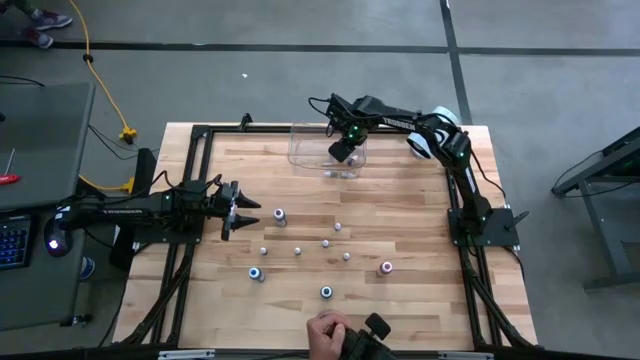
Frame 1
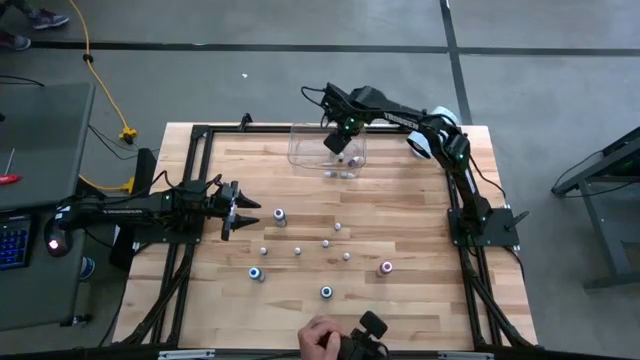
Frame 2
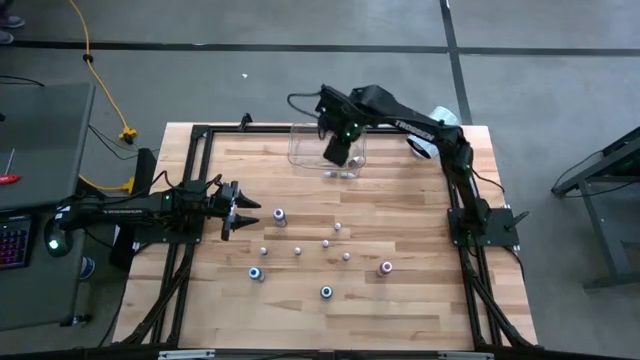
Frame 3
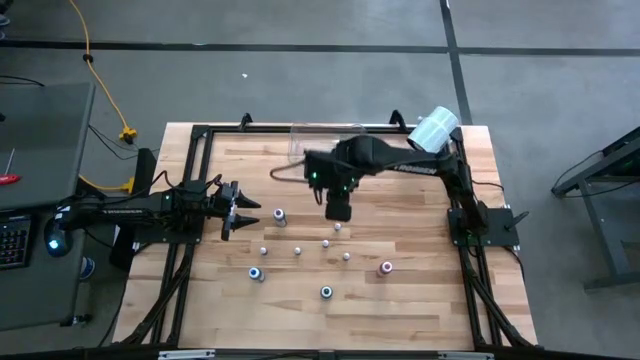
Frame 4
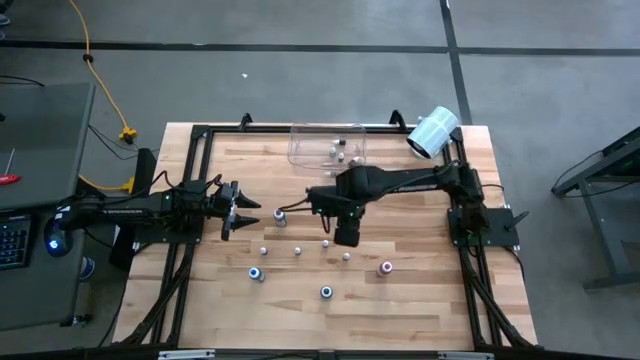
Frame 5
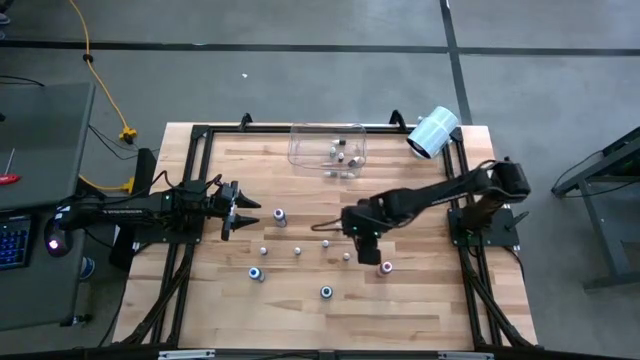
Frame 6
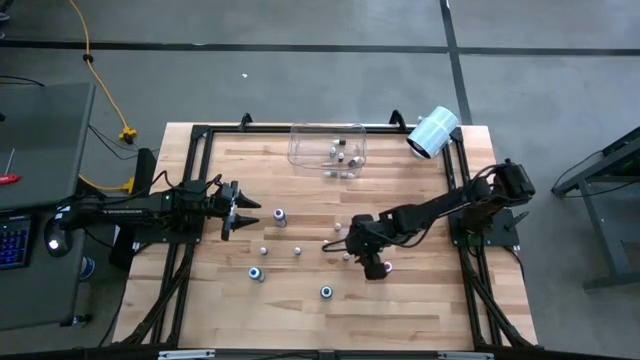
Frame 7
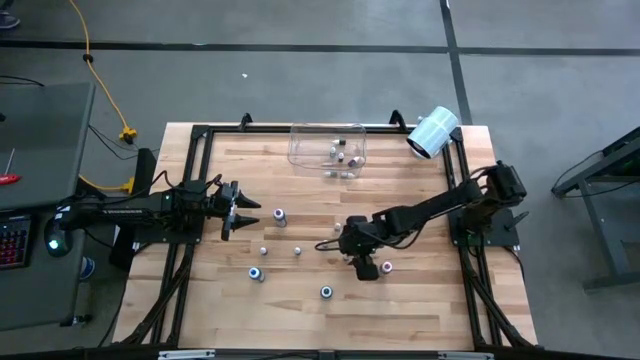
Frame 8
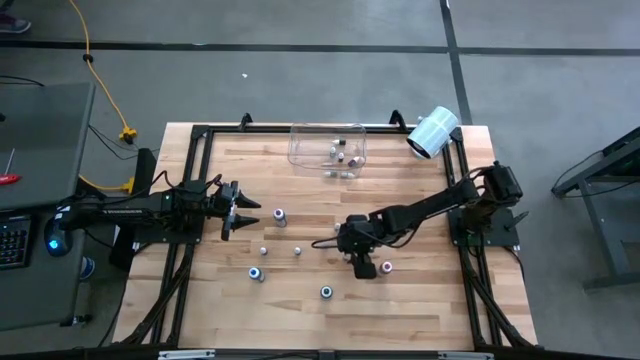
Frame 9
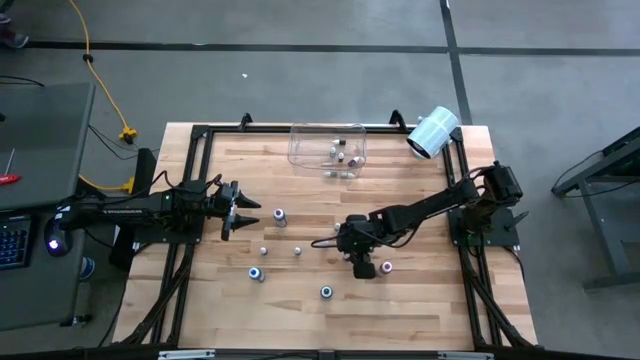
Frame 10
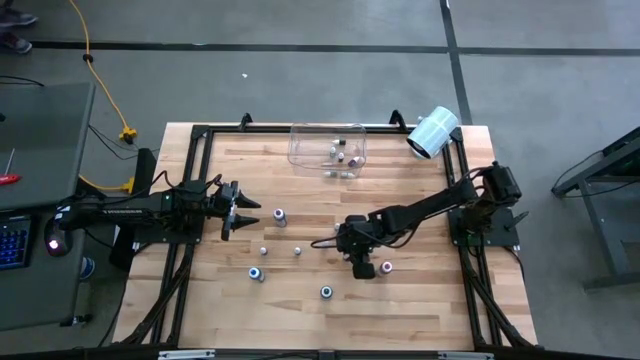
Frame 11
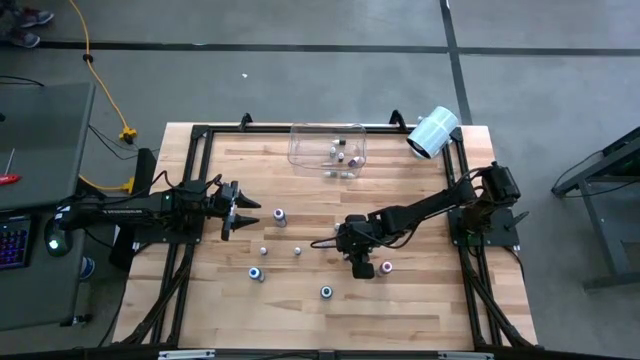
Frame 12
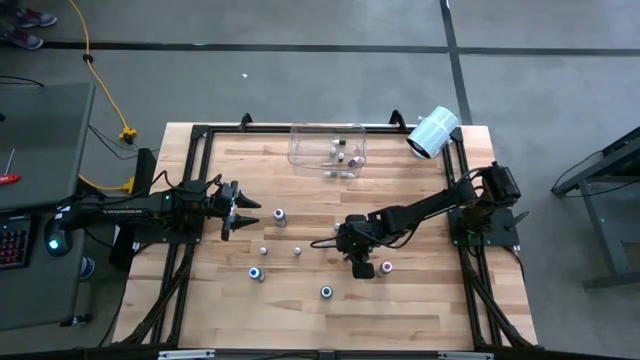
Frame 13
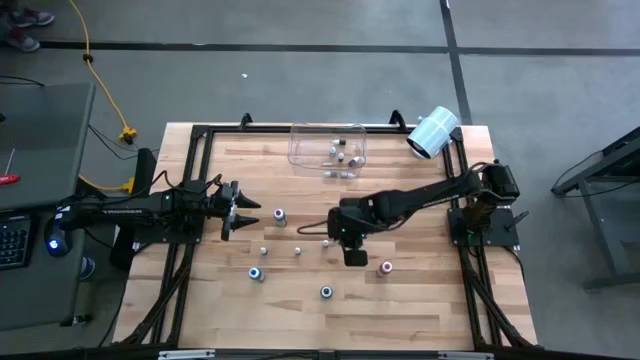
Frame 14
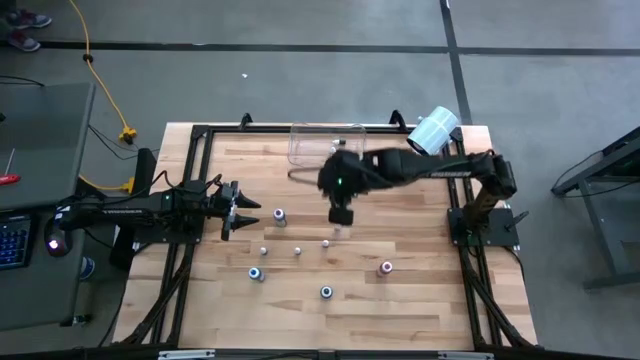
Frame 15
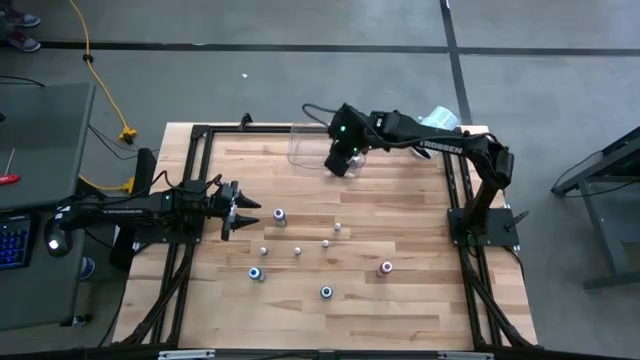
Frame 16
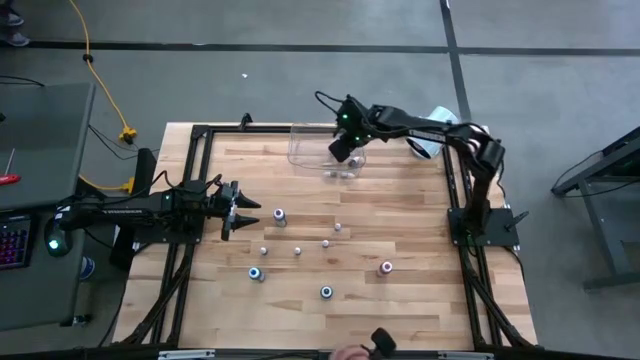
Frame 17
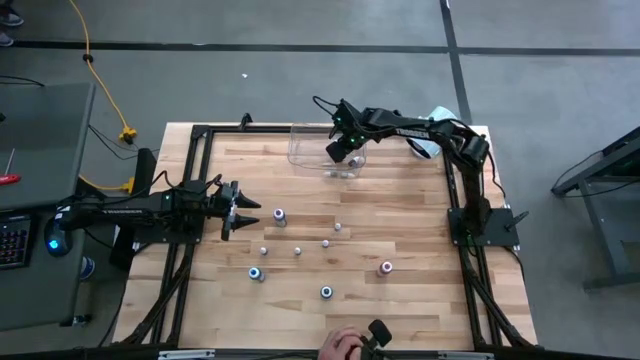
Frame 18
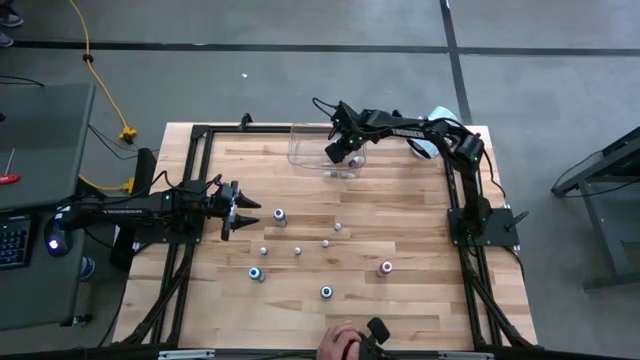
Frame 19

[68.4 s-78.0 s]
Task: Pick & Place food coloring
Put the small blue food coloring into the transparent container

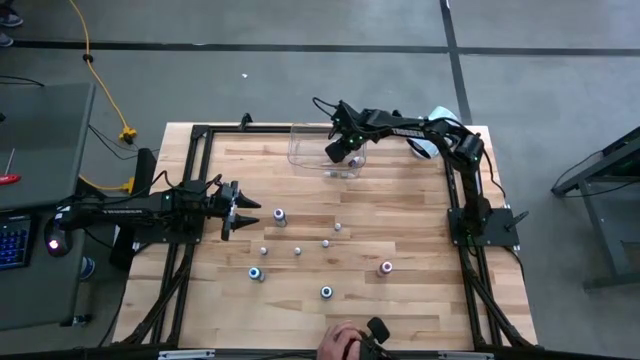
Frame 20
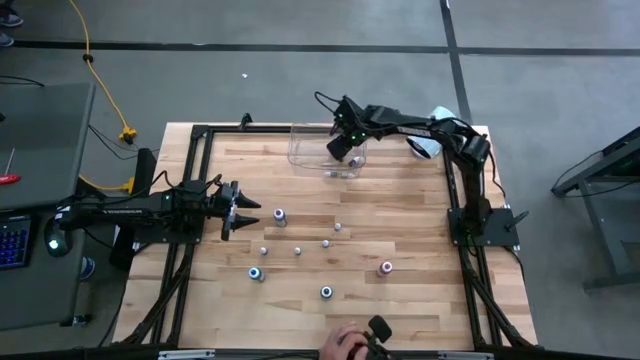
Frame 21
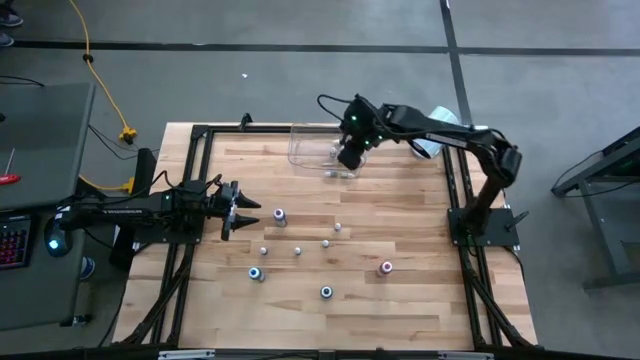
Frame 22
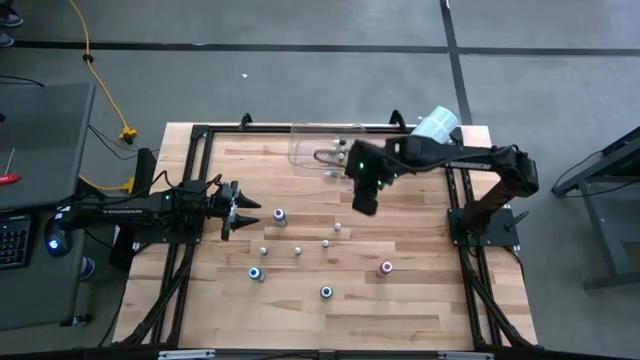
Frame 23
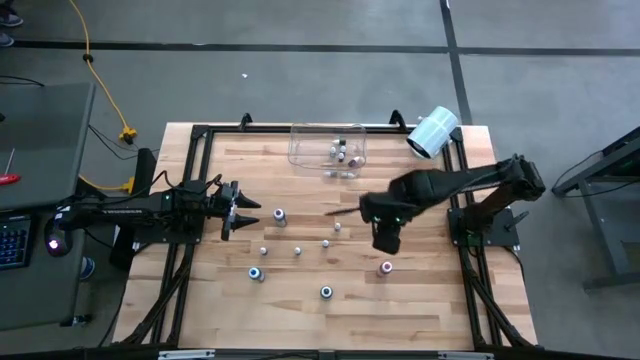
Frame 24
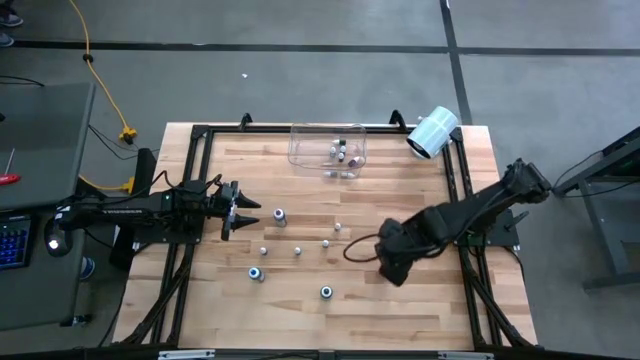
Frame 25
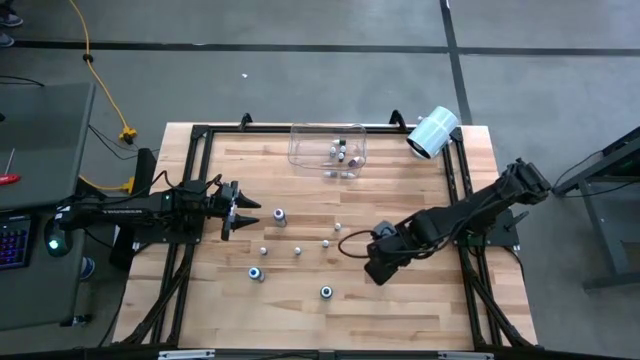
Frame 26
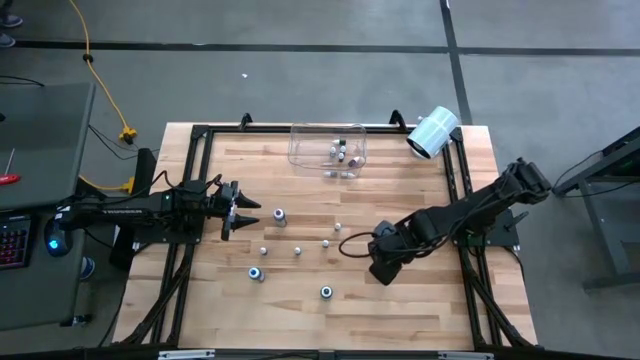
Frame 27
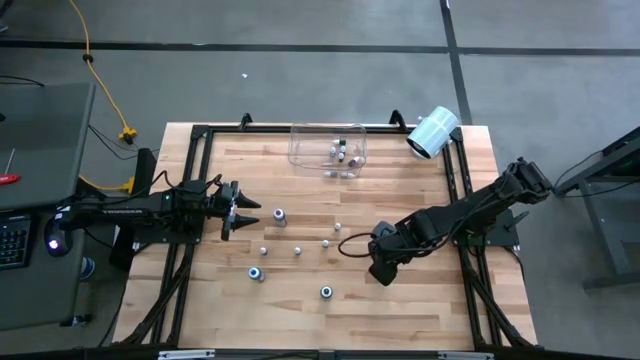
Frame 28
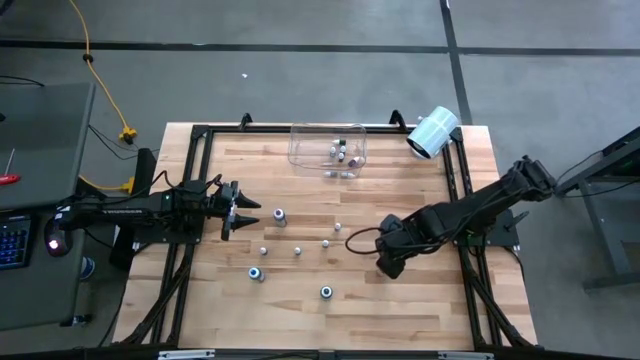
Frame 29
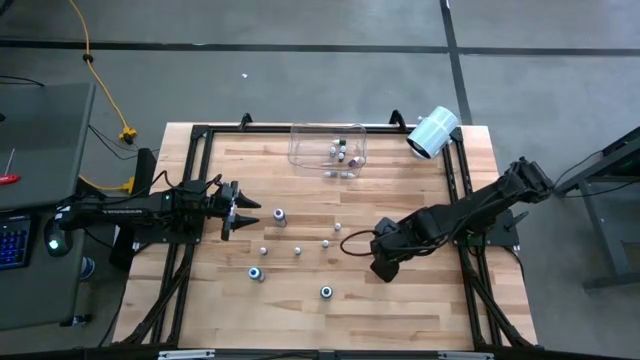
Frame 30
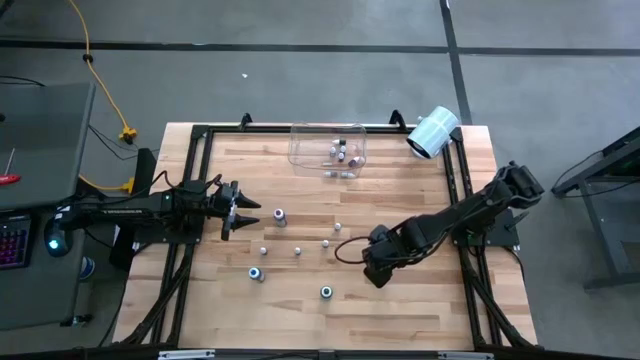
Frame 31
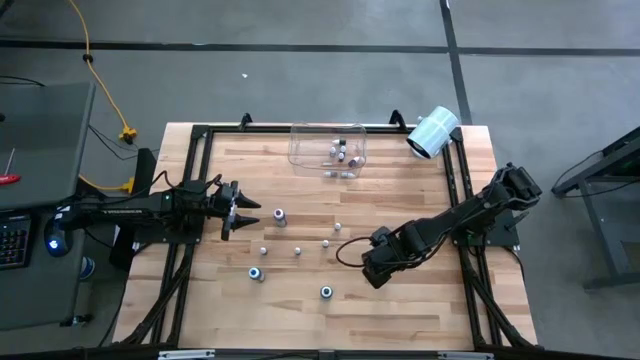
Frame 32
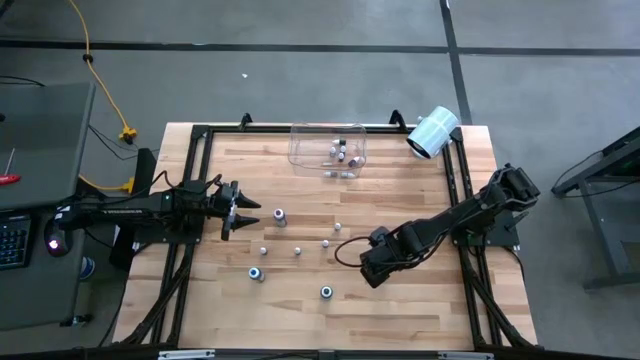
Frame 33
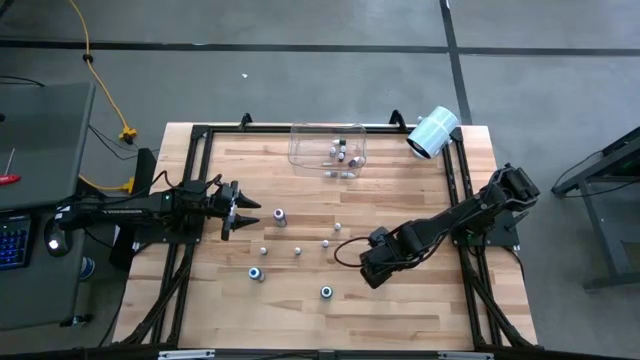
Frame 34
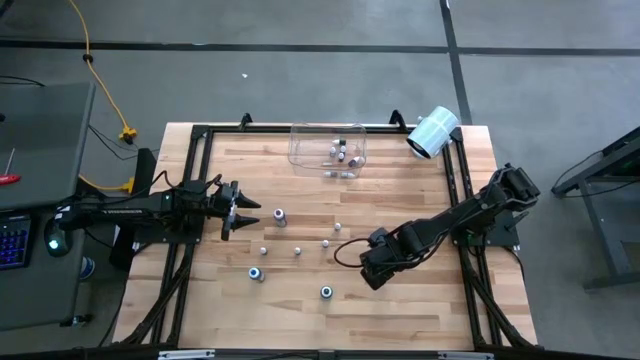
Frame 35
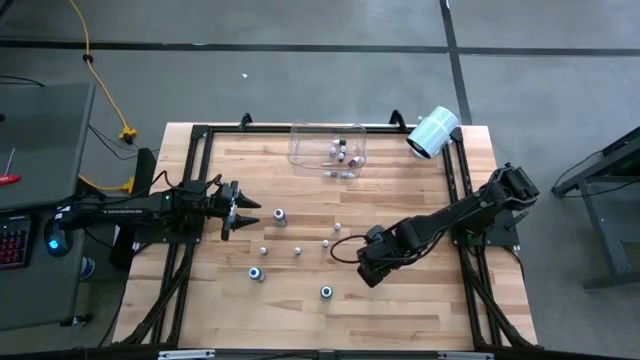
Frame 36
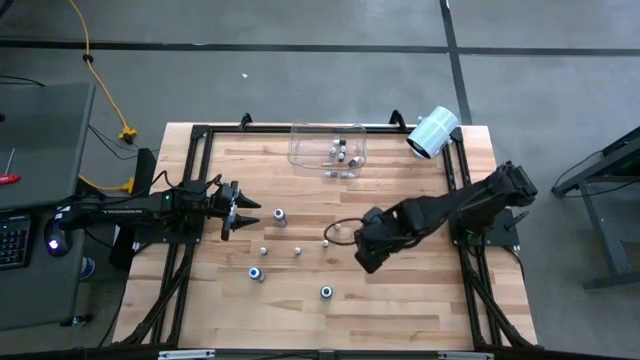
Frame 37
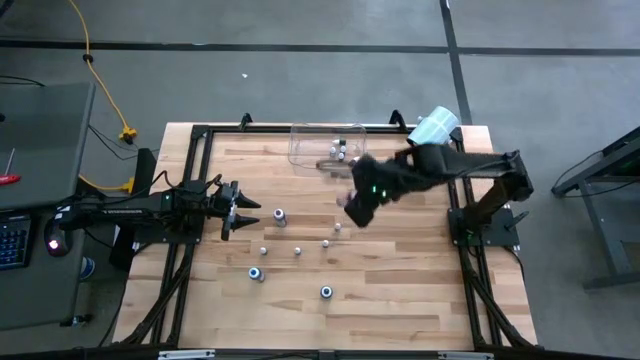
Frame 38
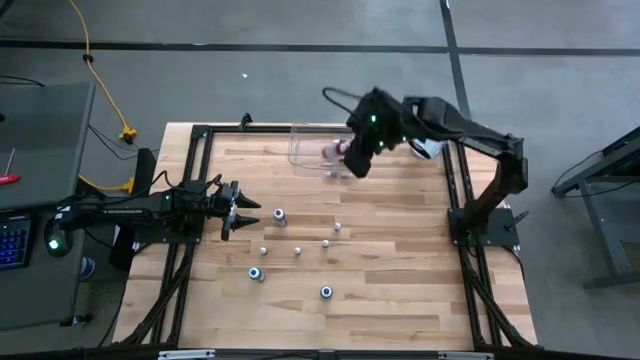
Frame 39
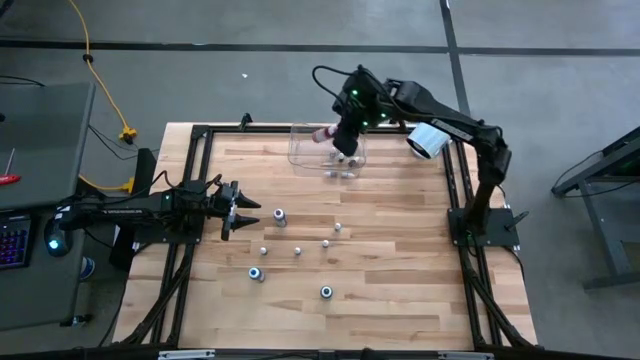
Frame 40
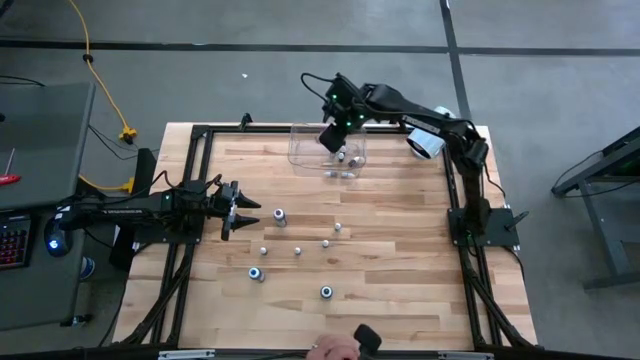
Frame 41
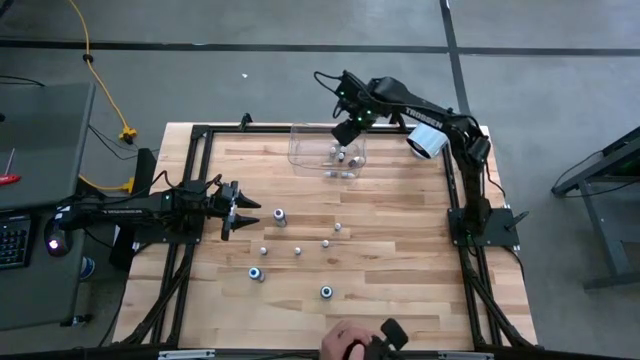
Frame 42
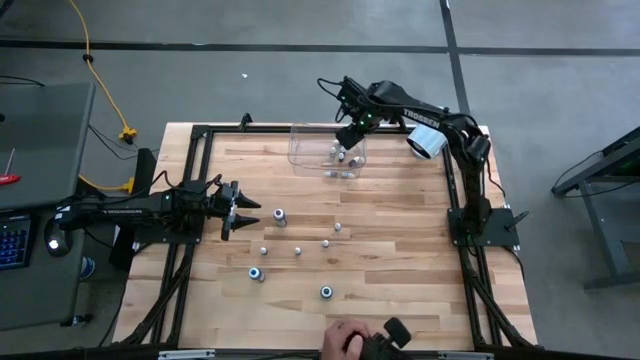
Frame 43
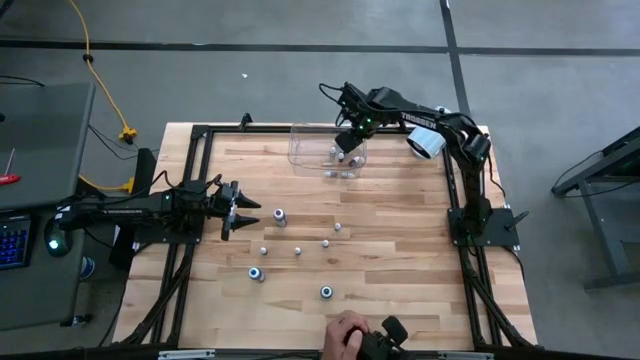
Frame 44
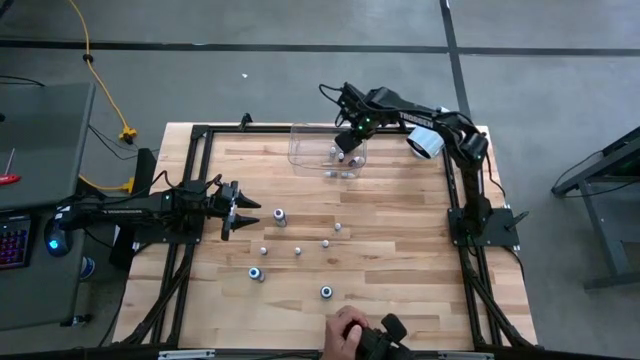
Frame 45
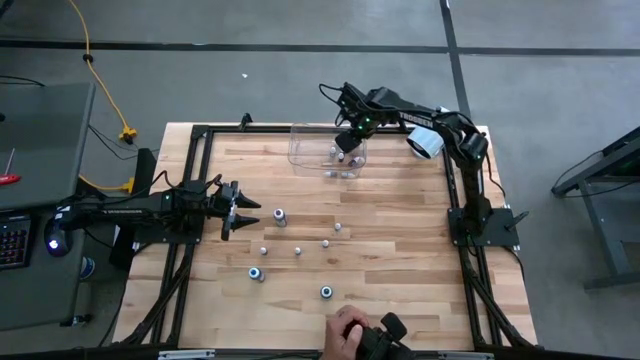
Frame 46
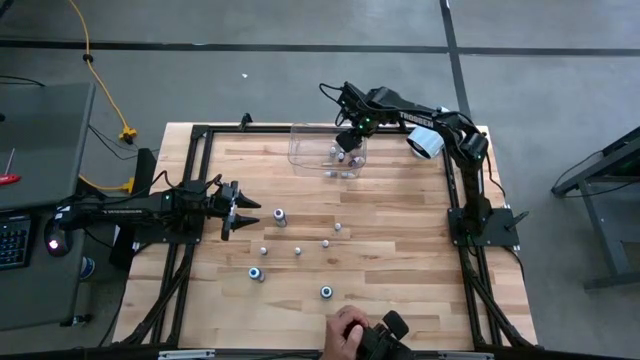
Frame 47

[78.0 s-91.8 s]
Put the large red food coloring into the transparent container
